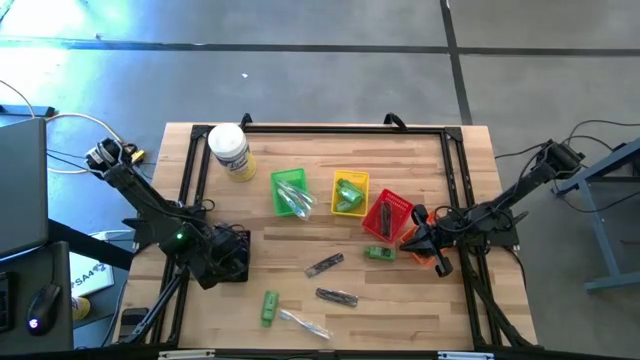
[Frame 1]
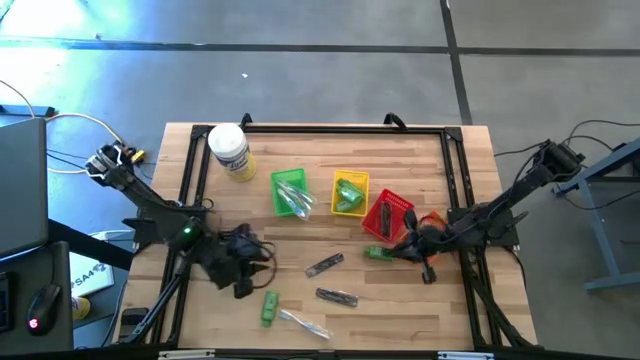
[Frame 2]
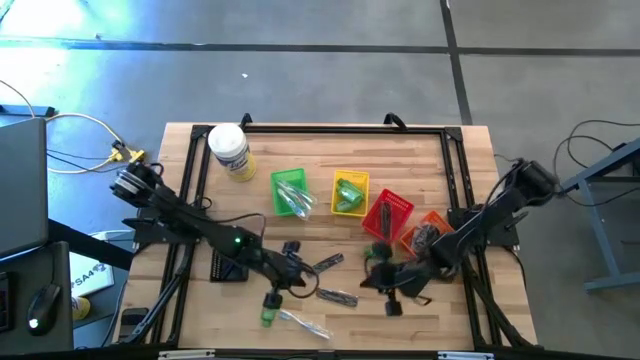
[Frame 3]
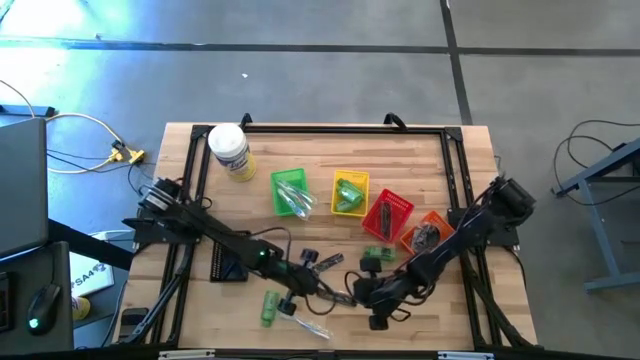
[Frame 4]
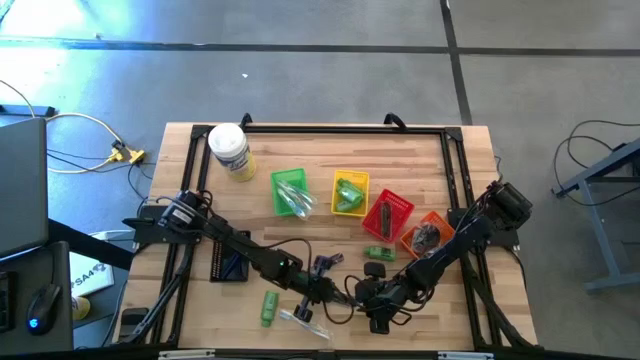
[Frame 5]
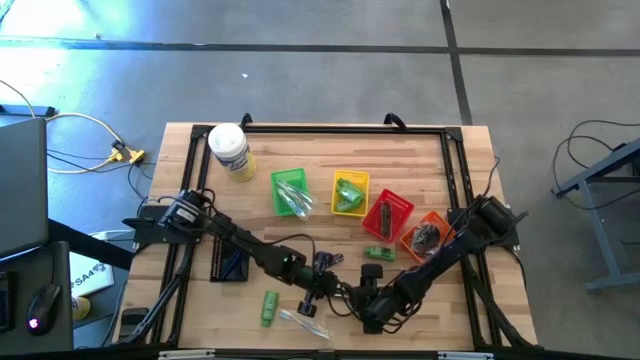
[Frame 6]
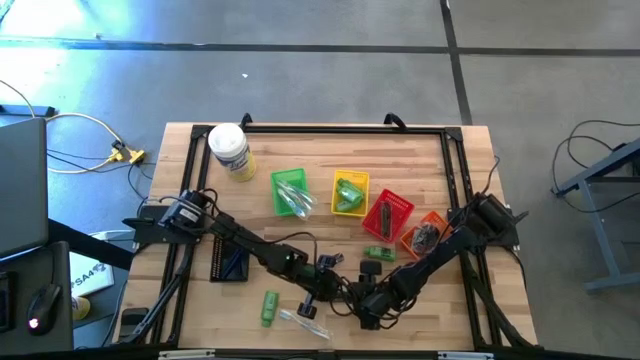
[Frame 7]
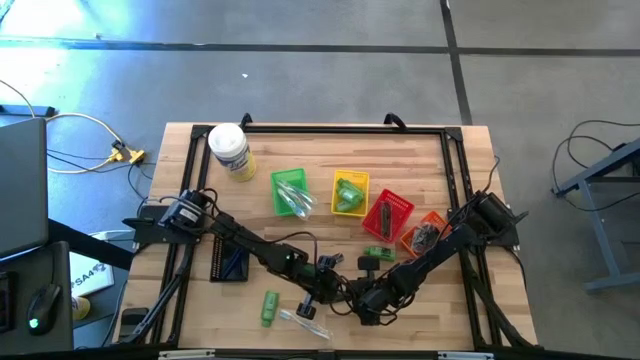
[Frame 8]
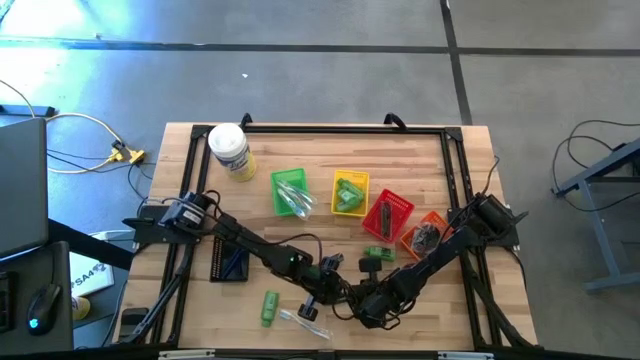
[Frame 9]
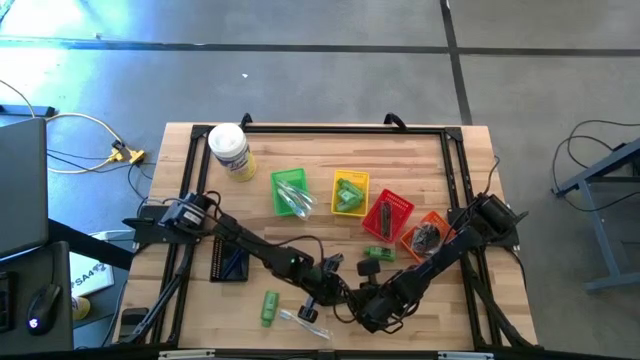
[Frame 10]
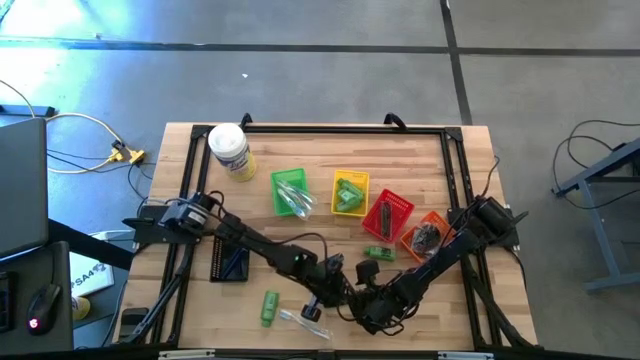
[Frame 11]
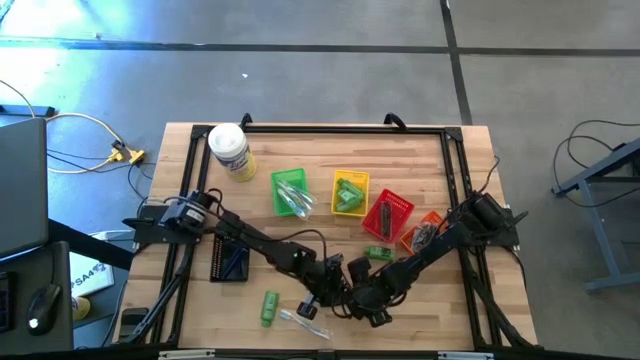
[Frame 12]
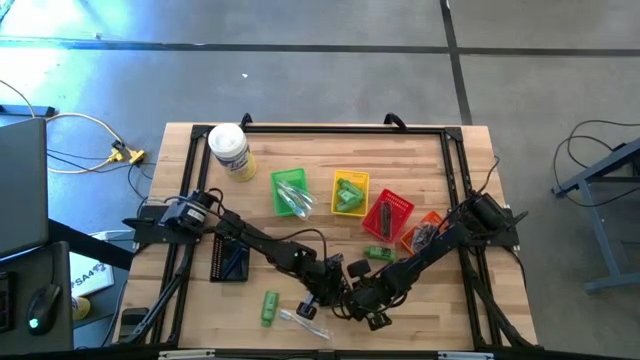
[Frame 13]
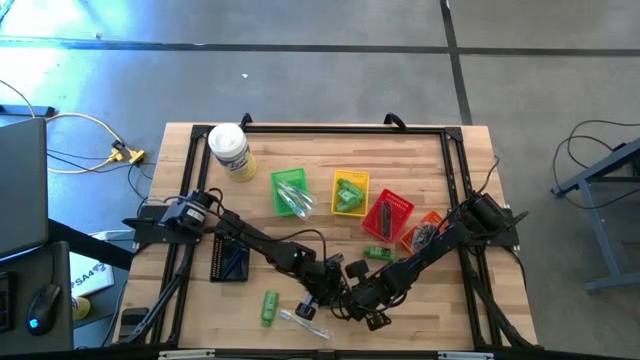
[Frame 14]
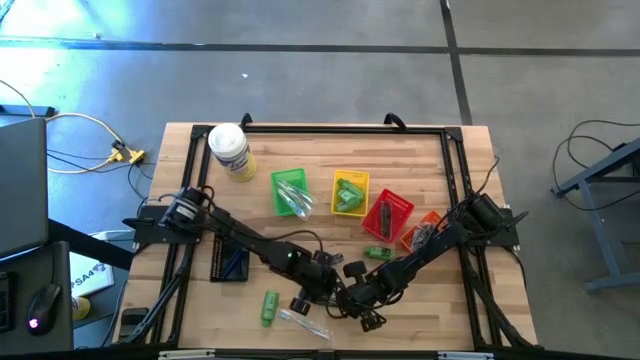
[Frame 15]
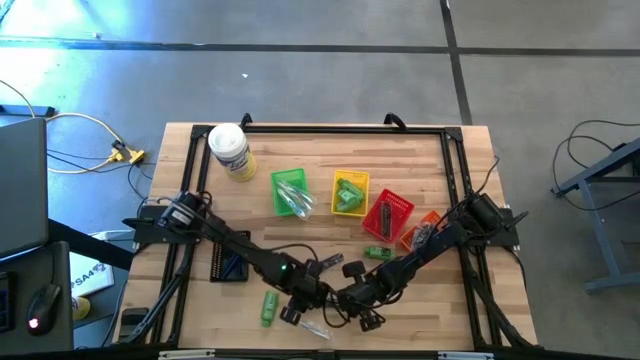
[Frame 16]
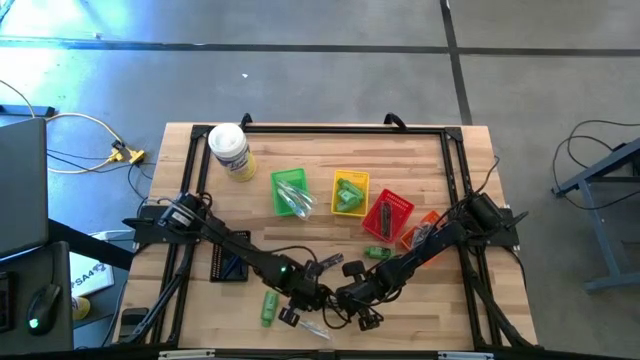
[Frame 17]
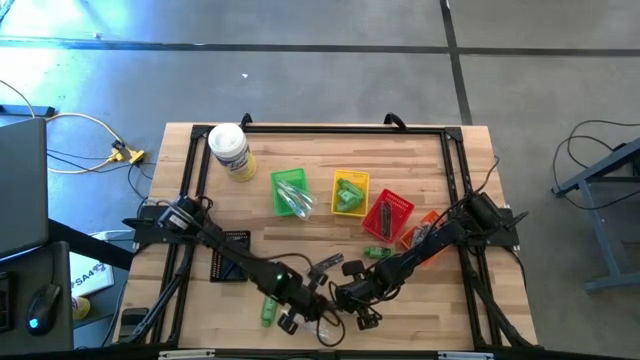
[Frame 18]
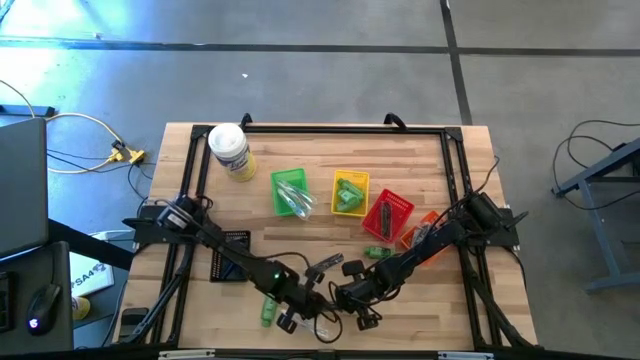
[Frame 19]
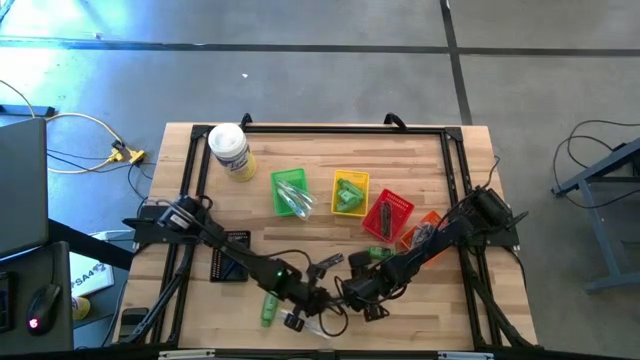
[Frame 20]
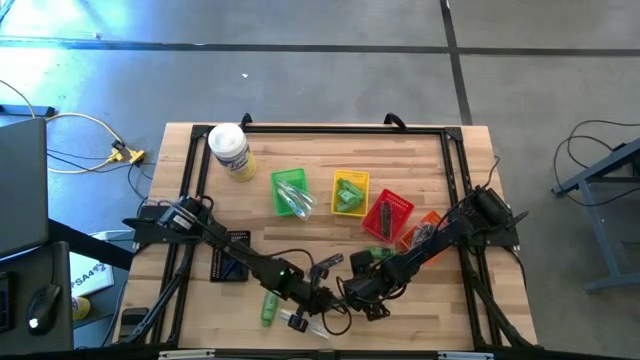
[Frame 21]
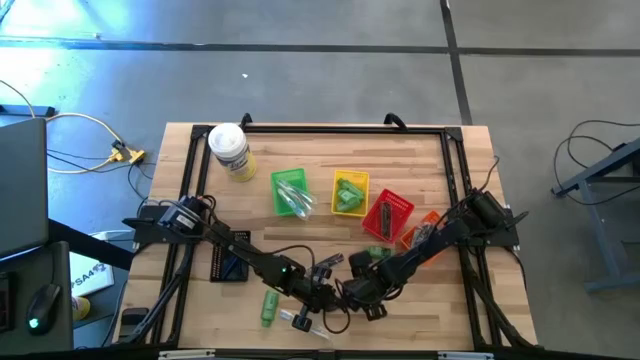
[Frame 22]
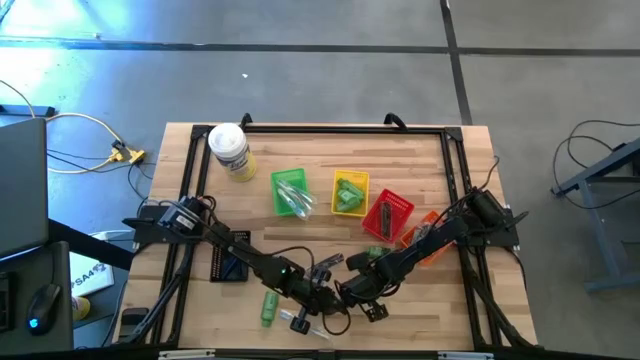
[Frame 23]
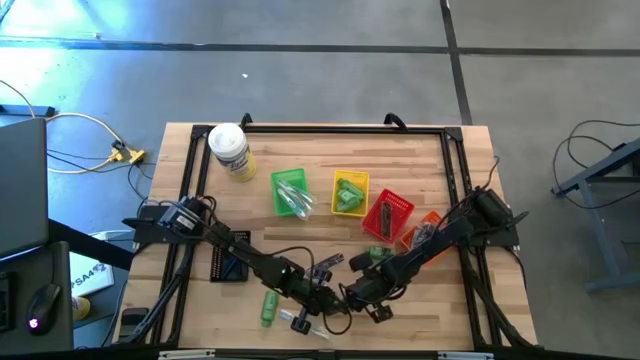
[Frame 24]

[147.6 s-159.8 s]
Task: Pick & Place Travel size toiletries
Put the black hair comb into the red bin

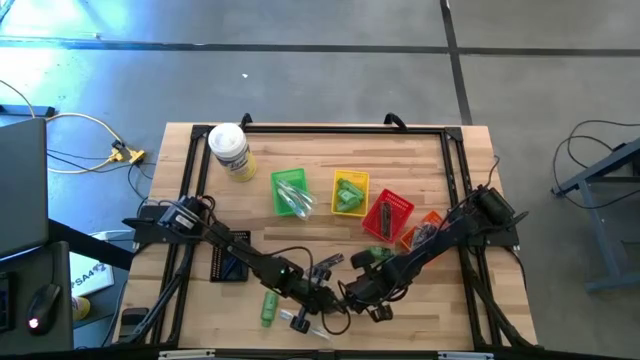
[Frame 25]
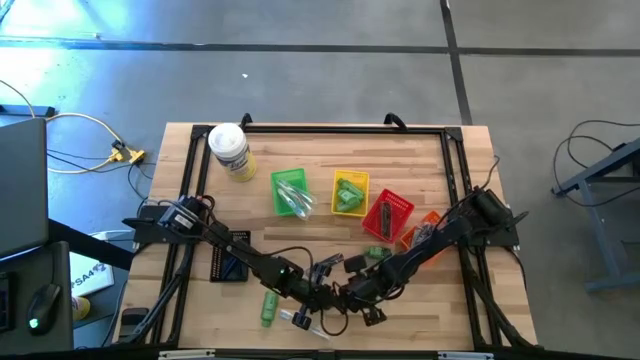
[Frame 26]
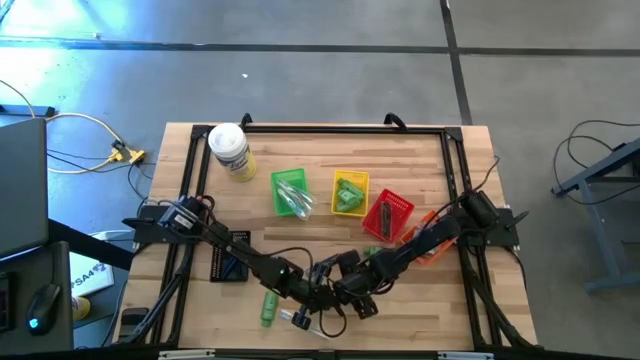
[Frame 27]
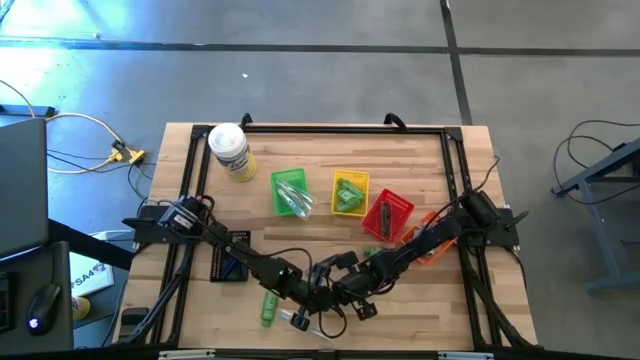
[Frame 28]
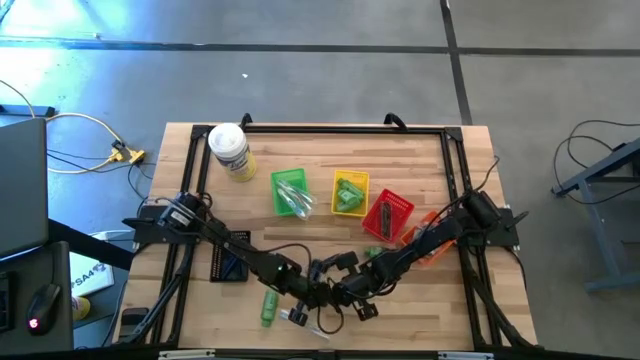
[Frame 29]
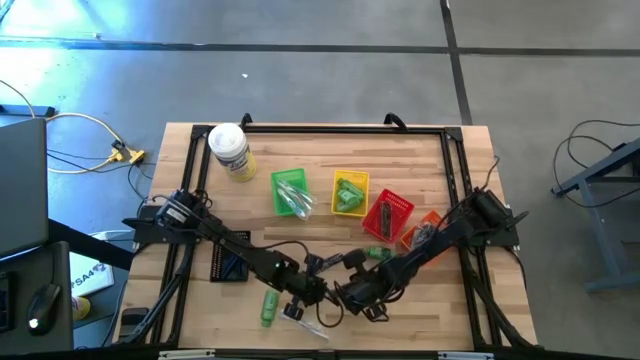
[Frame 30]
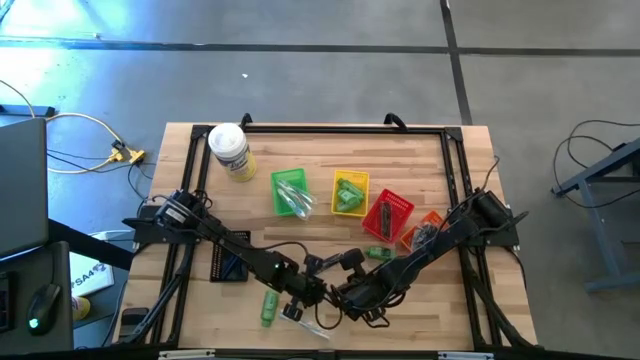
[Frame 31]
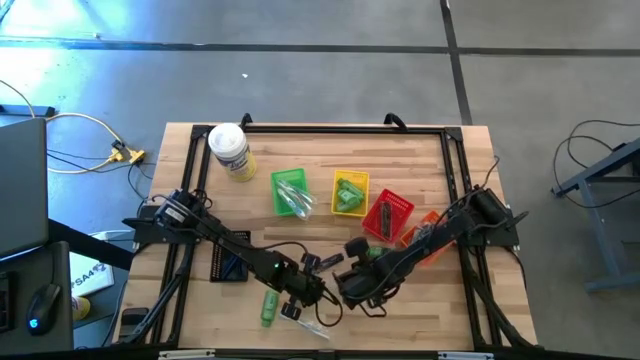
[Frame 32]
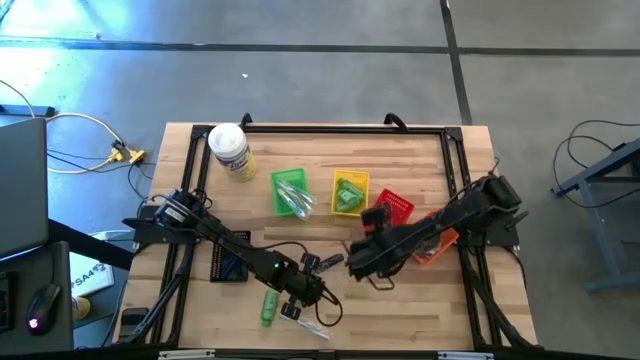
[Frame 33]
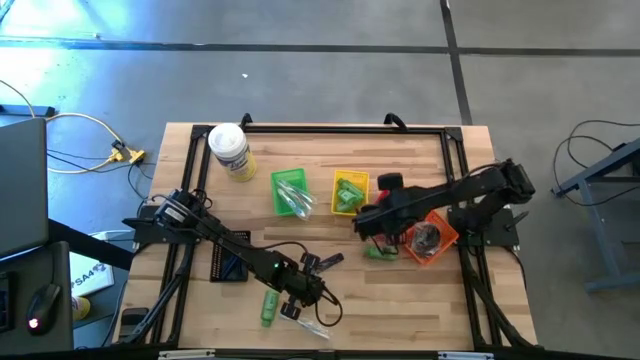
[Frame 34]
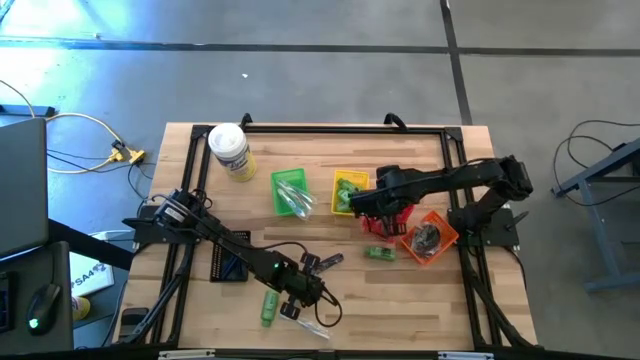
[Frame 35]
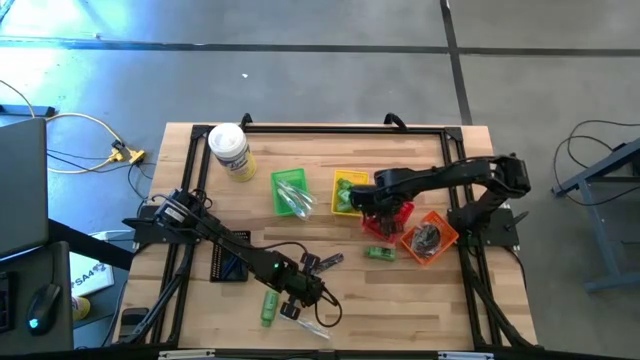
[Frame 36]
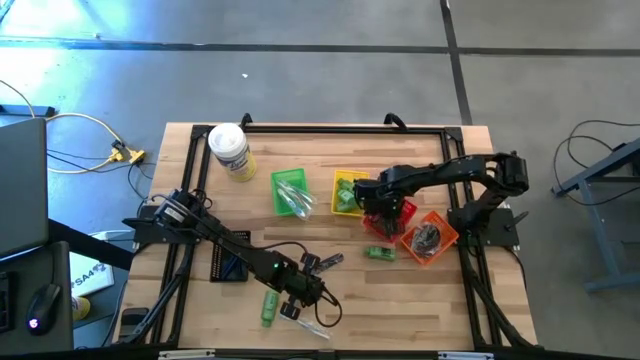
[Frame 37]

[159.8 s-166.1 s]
Put the black hair comb into the red bin

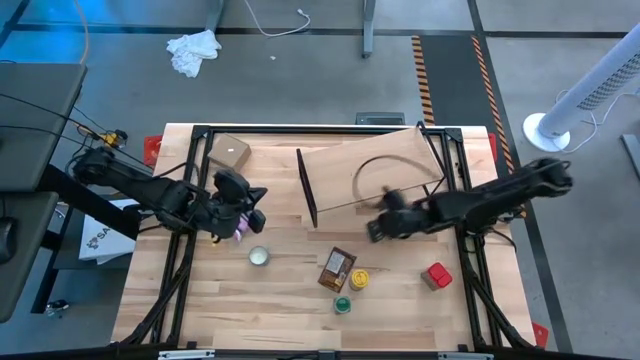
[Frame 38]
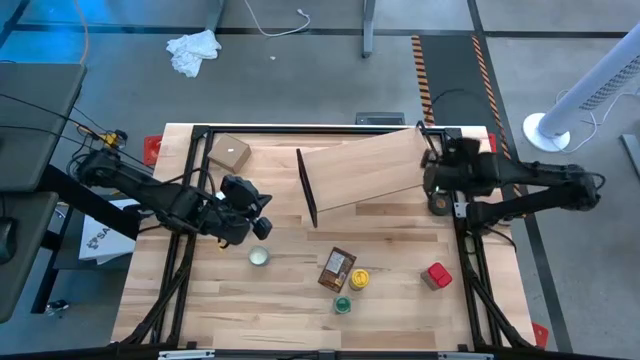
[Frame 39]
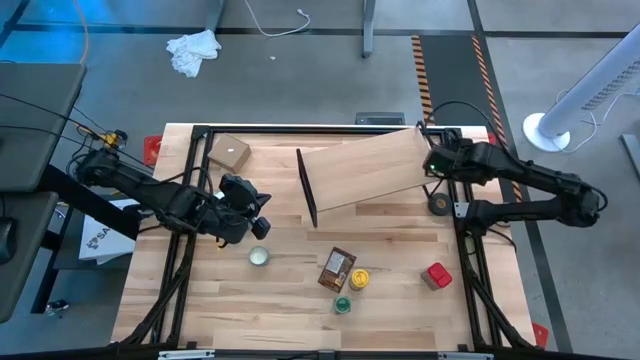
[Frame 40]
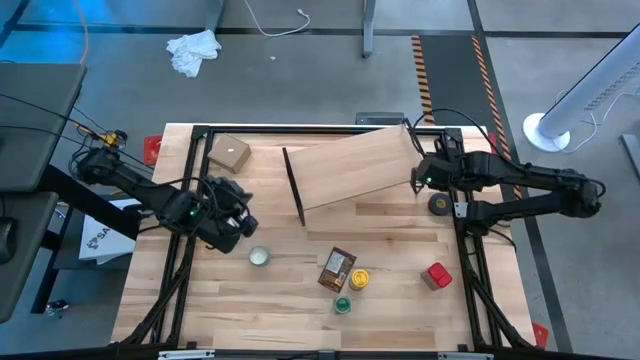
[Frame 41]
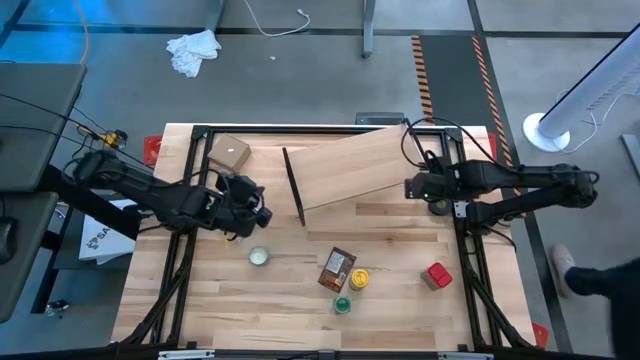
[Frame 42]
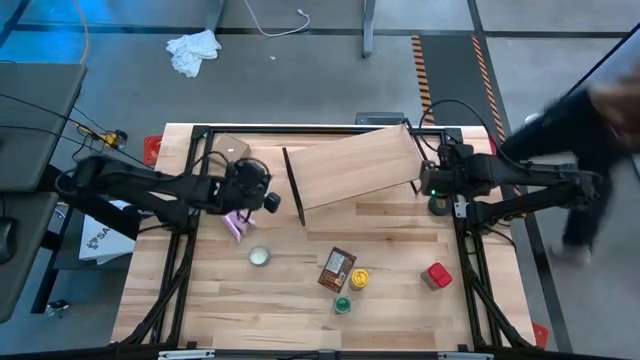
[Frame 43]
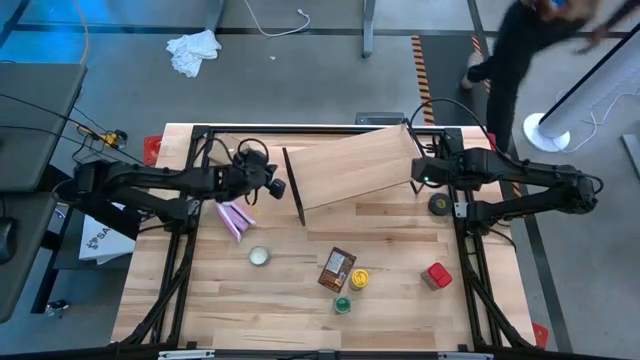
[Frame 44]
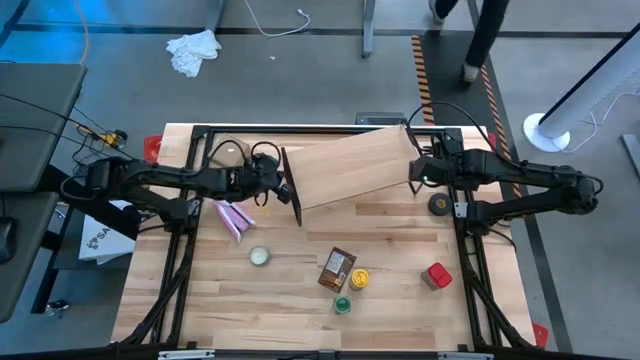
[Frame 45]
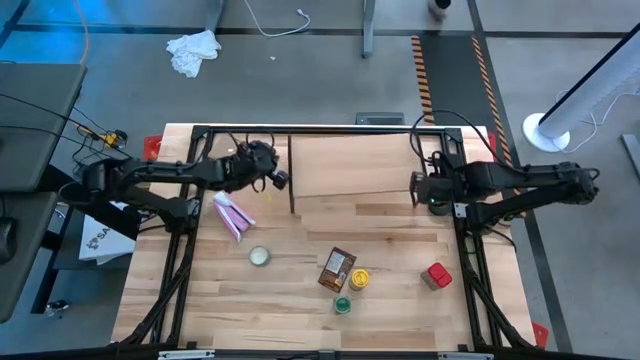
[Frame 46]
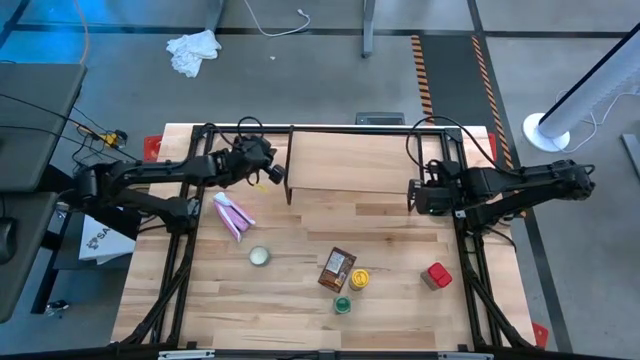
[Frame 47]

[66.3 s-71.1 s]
Task: Shelf spices
Adjust the shelf
